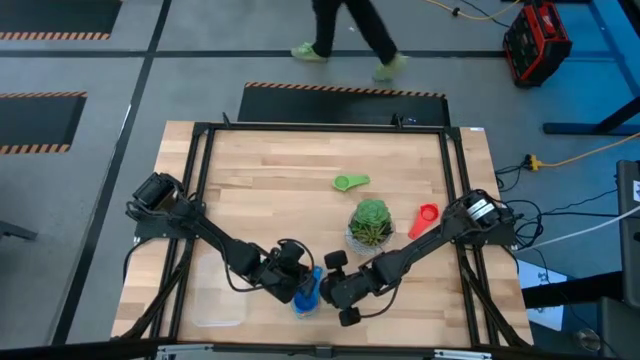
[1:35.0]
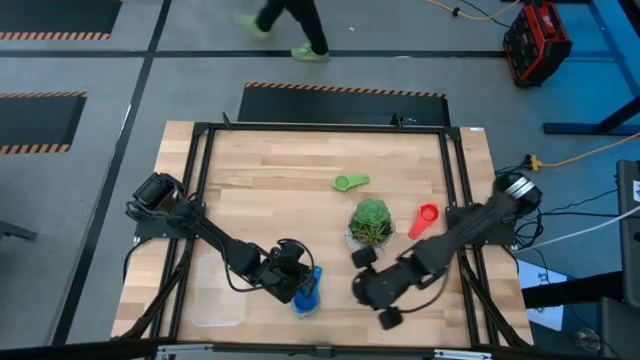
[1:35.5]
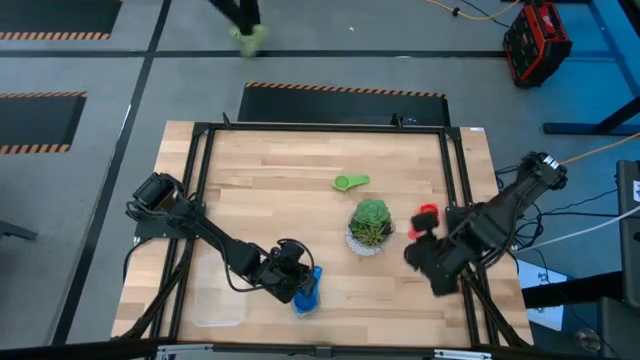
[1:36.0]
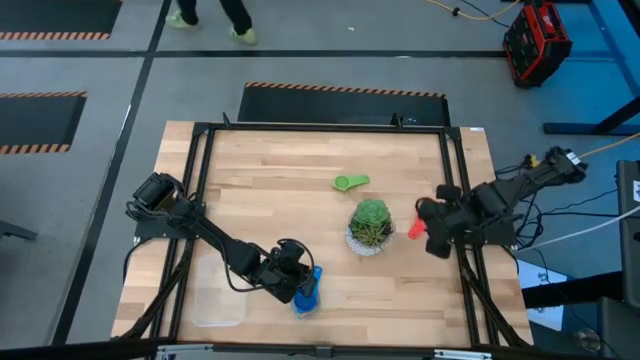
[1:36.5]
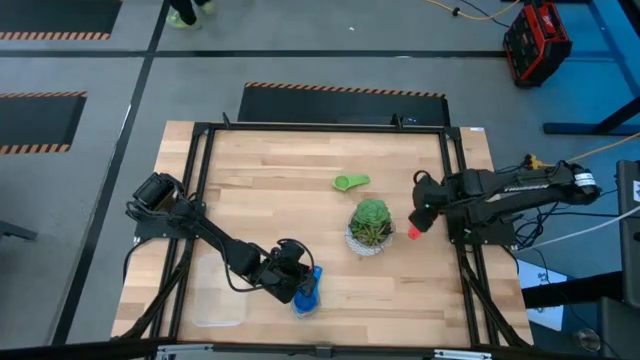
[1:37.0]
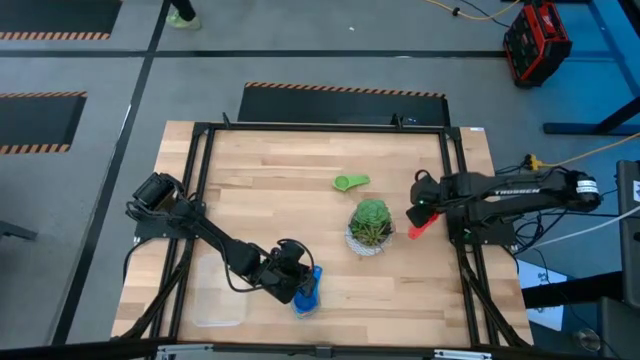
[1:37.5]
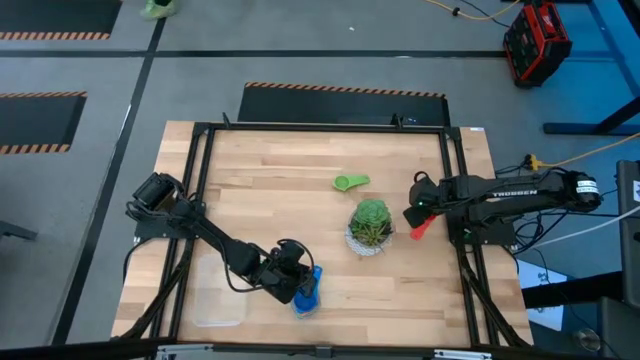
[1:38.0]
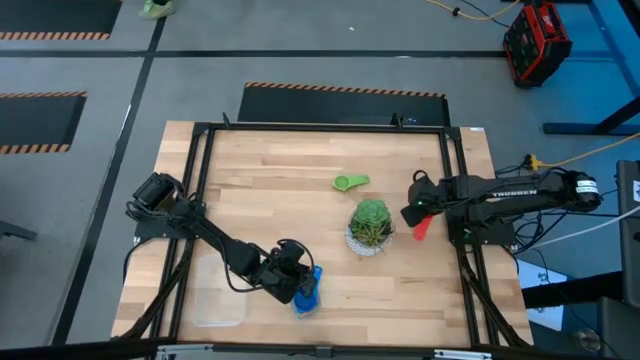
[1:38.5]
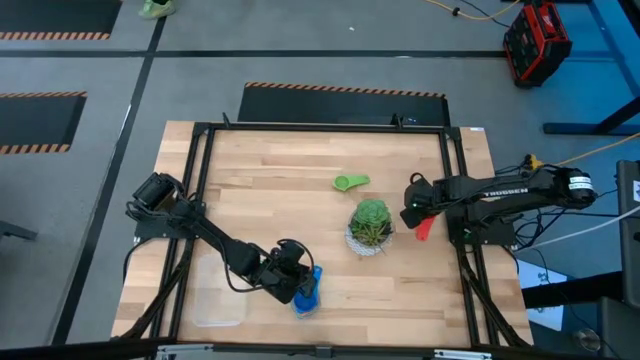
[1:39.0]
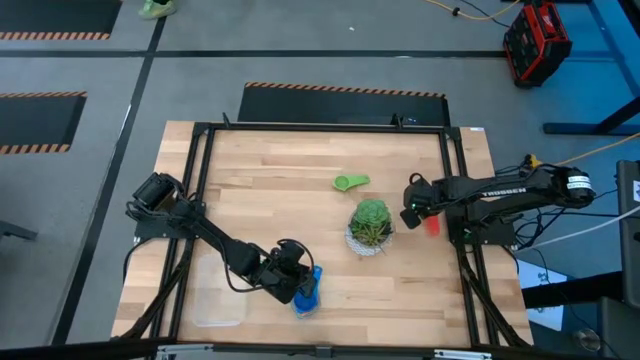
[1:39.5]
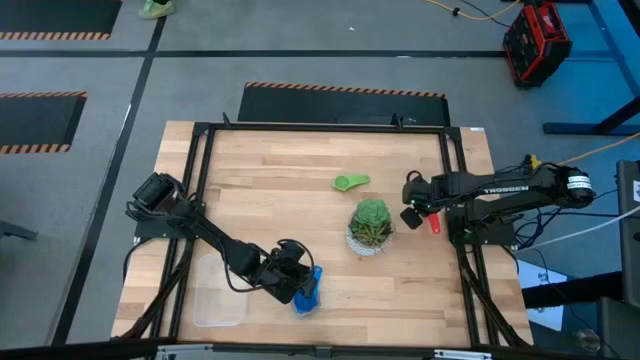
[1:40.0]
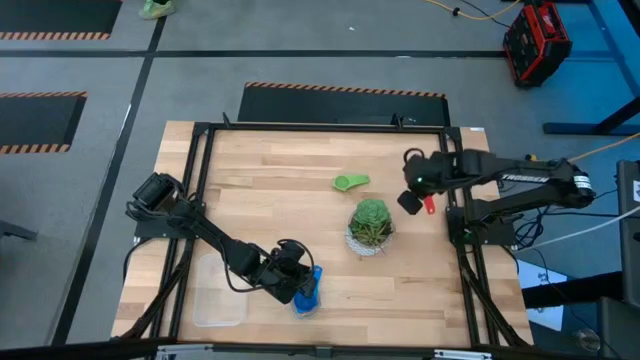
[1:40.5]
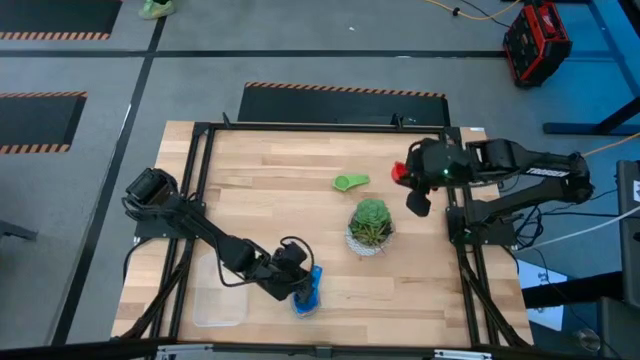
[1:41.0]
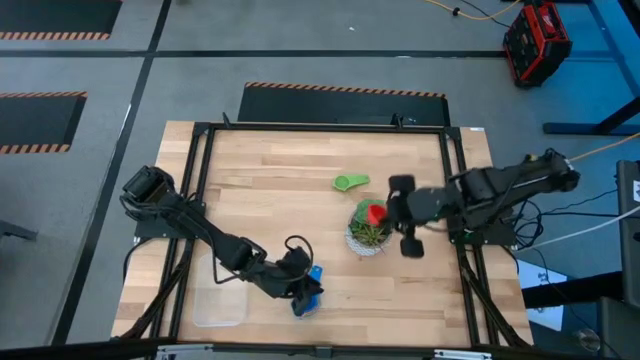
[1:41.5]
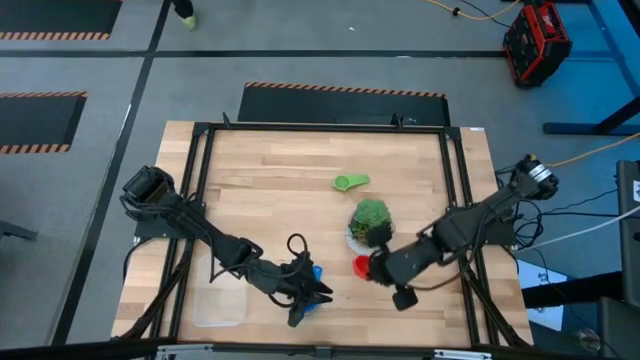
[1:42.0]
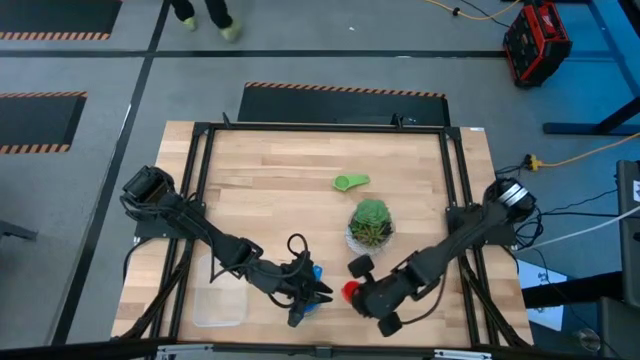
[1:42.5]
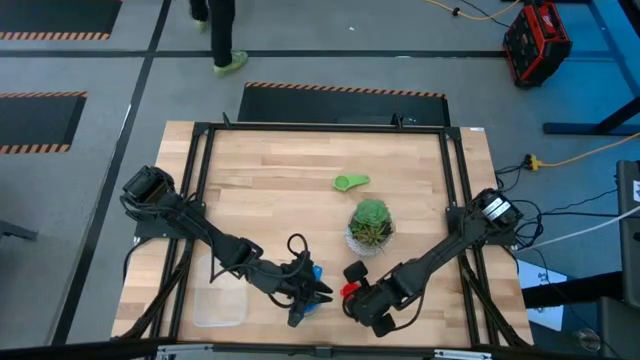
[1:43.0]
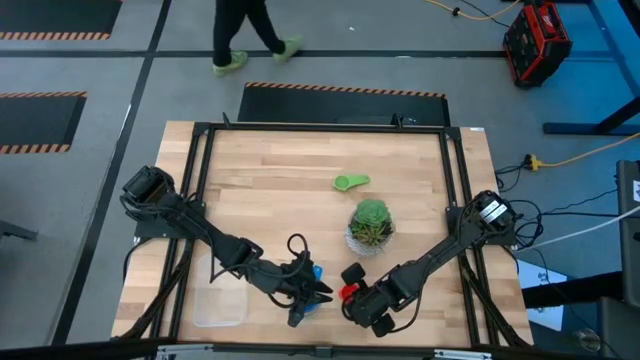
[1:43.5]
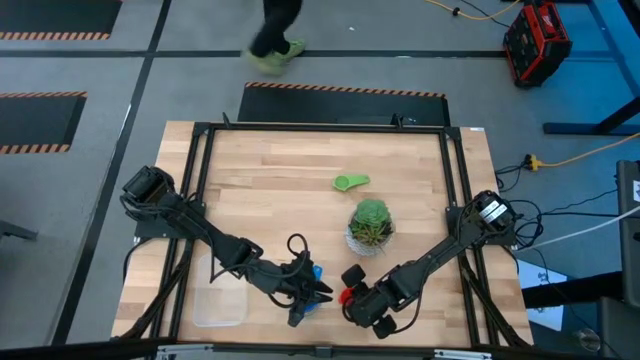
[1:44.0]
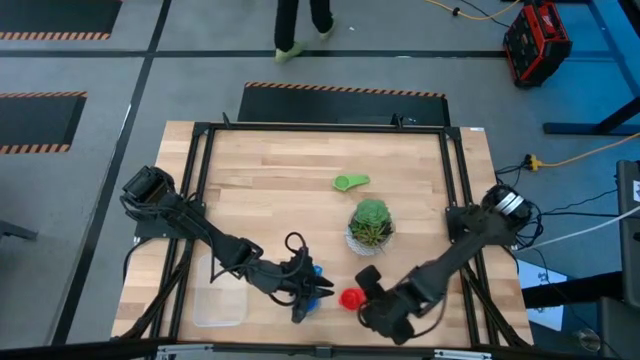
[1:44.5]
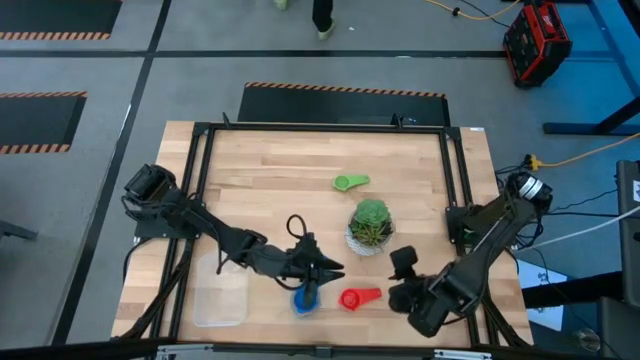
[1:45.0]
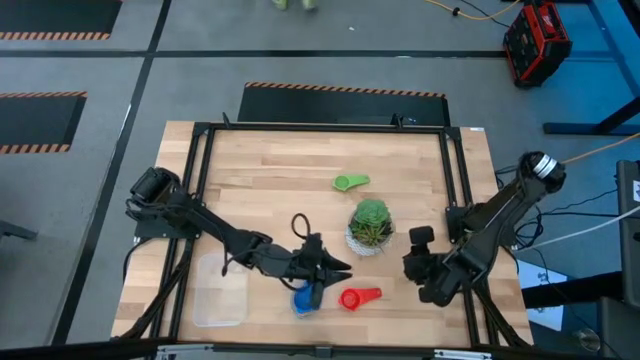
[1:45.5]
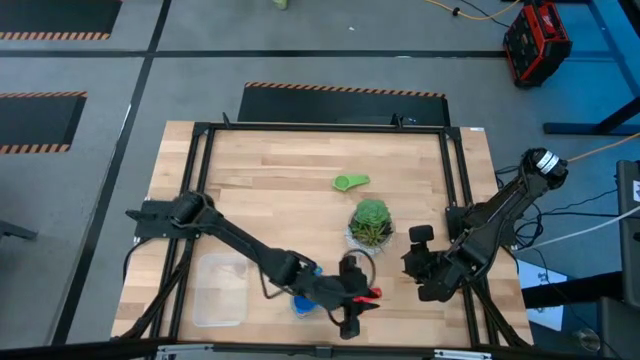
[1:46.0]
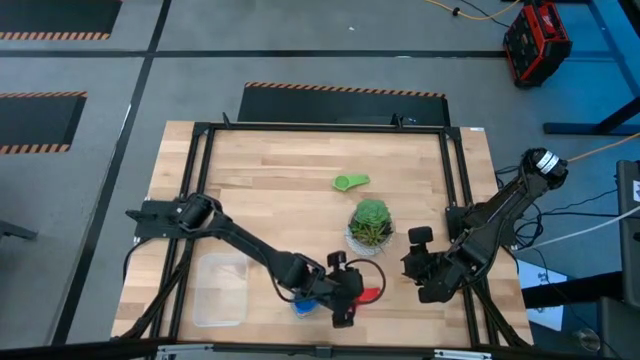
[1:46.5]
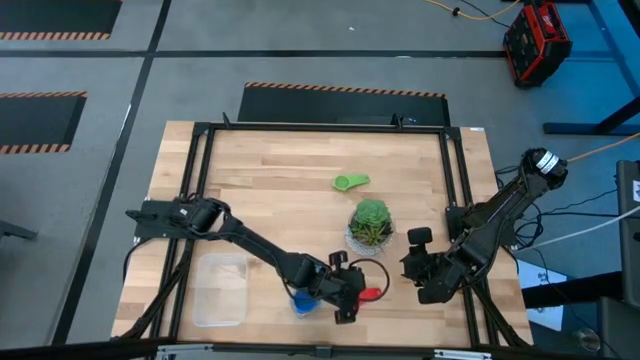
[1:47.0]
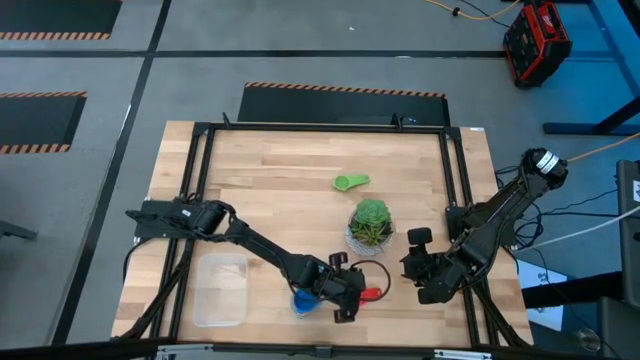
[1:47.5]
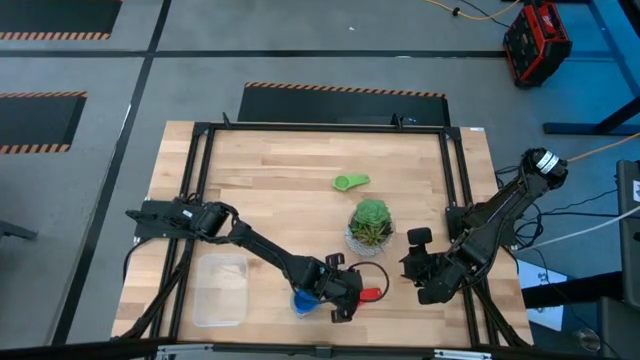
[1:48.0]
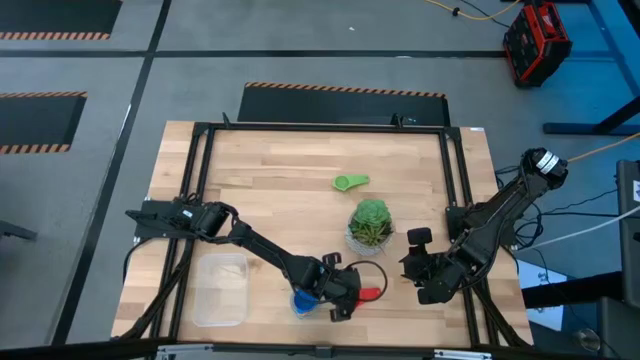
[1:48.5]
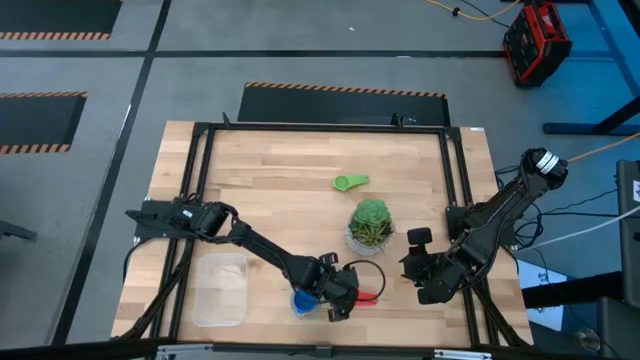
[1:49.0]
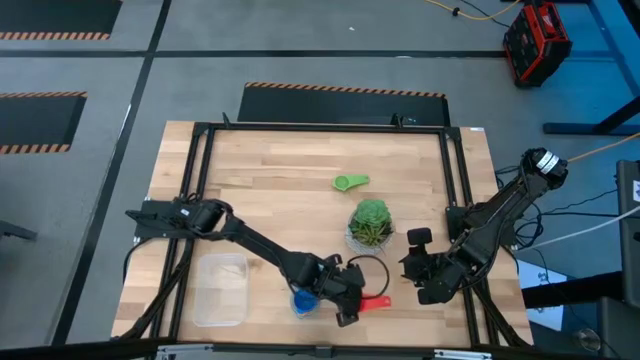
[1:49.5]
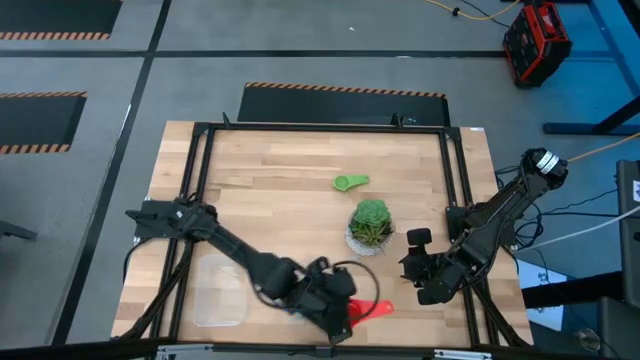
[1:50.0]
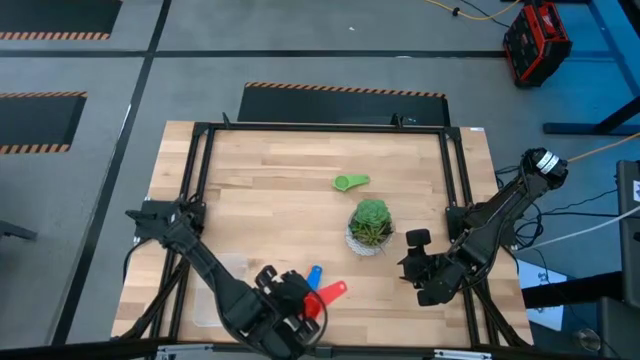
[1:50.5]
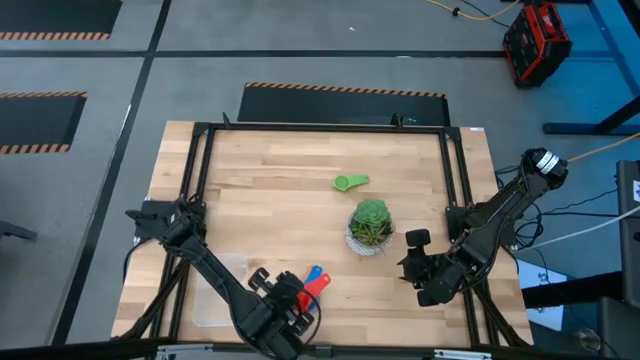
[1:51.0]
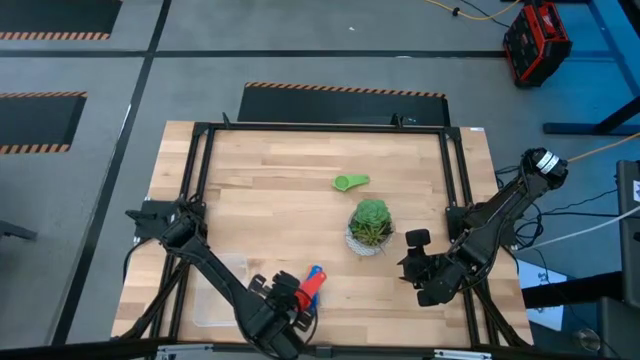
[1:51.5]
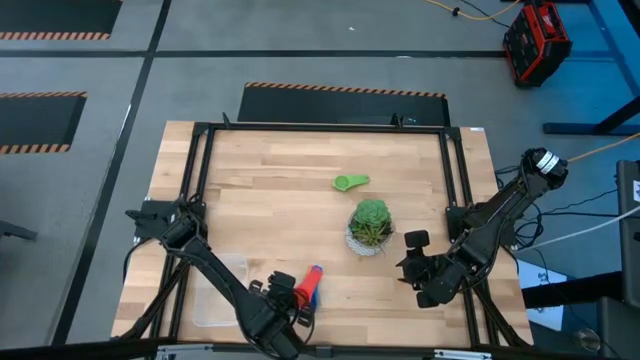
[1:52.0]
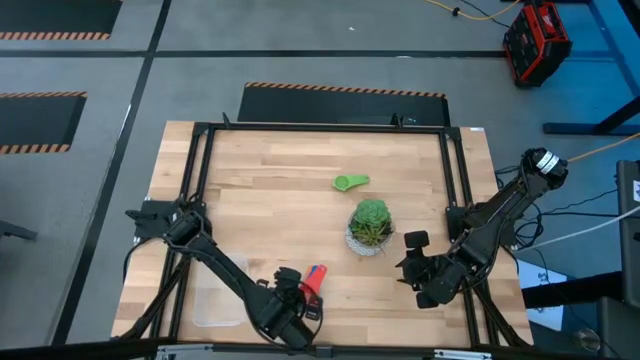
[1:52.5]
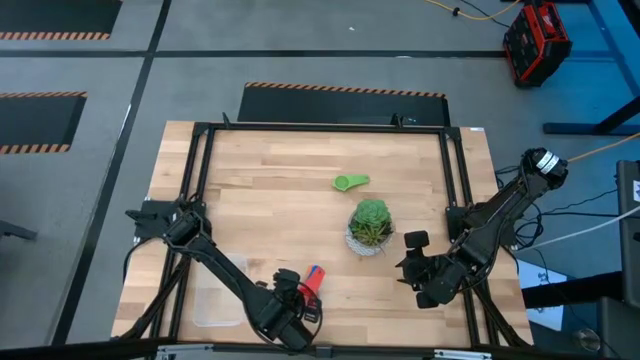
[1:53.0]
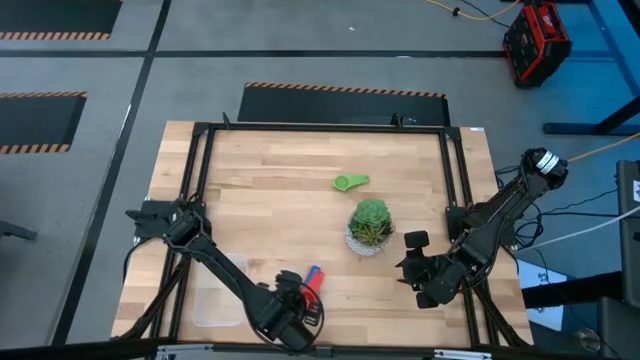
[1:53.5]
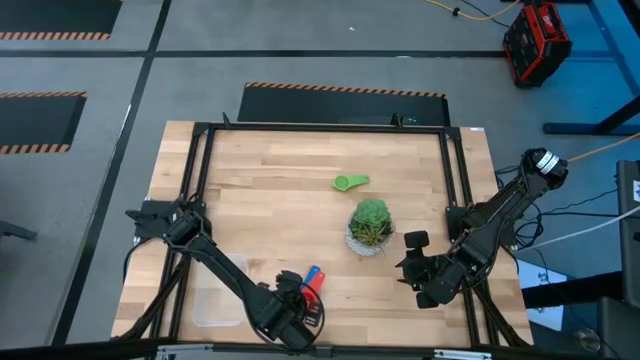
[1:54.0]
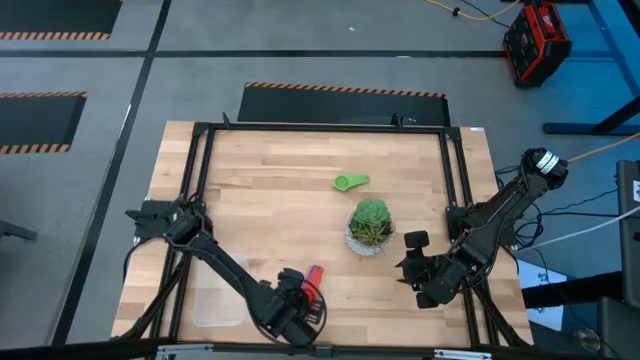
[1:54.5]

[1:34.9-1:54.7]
Task: Nest measuring cups in basket
Stack the red measuring cup on top of the blue measuring cup

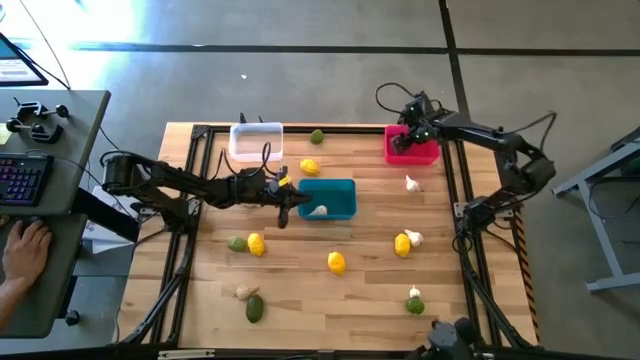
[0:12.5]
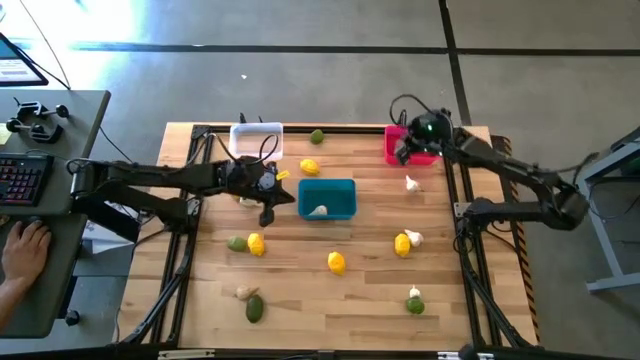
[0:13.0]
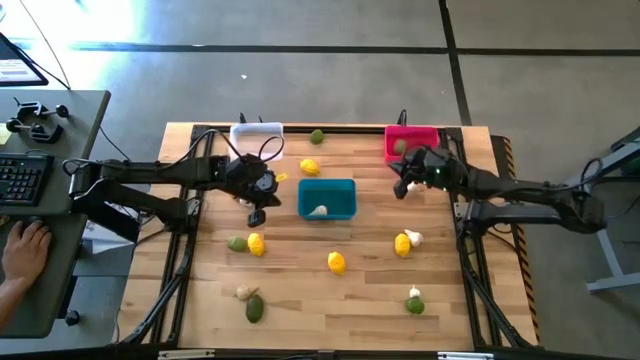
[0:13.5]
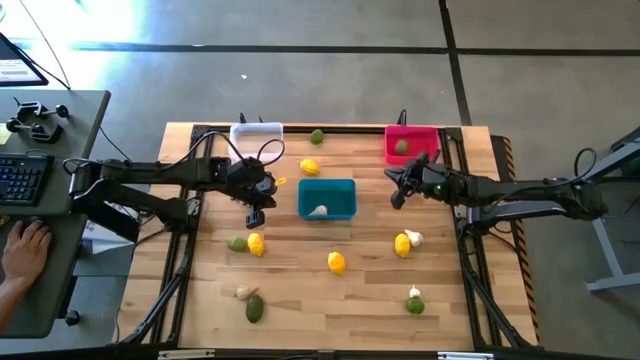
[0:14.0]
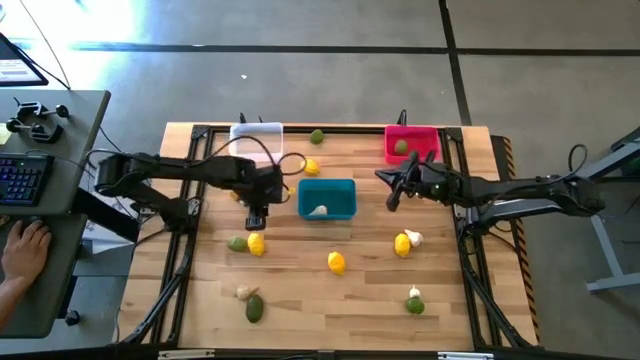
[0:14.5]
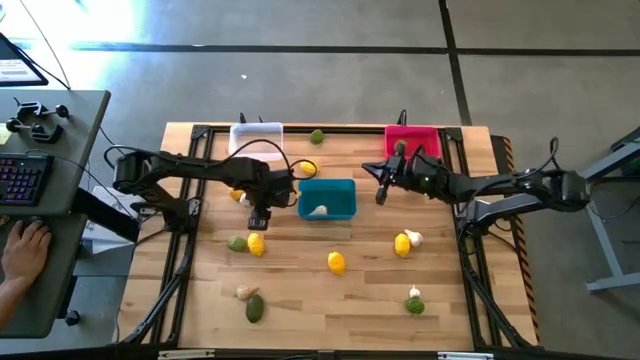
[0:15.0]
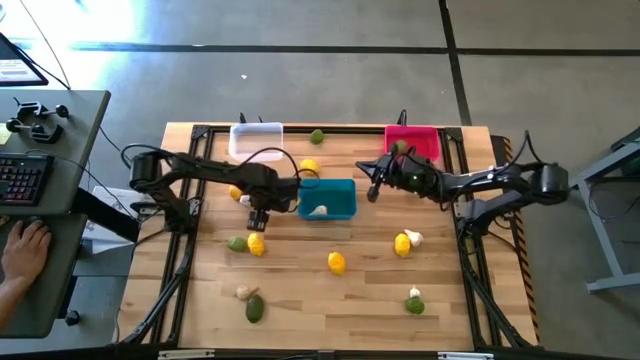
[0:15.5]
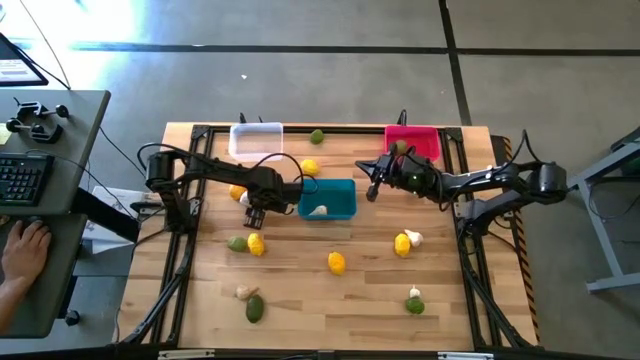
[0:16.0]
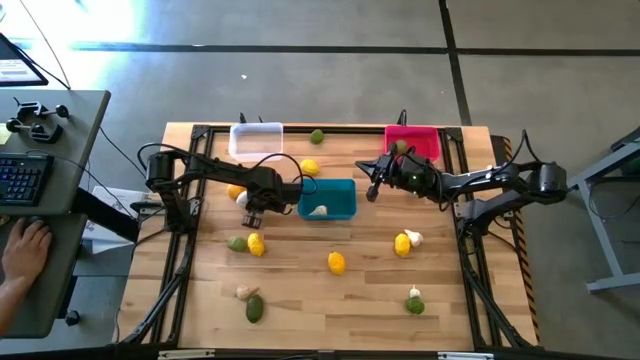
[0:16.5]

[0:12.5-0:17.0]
Task: Sort produce into baskets
Put the garlic into the blue bin
